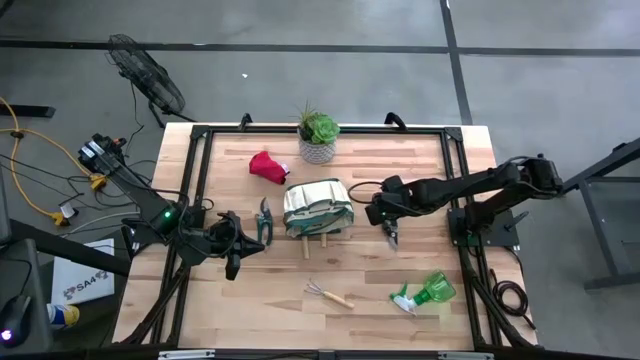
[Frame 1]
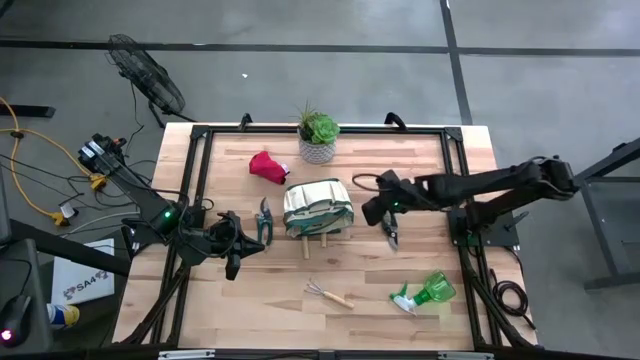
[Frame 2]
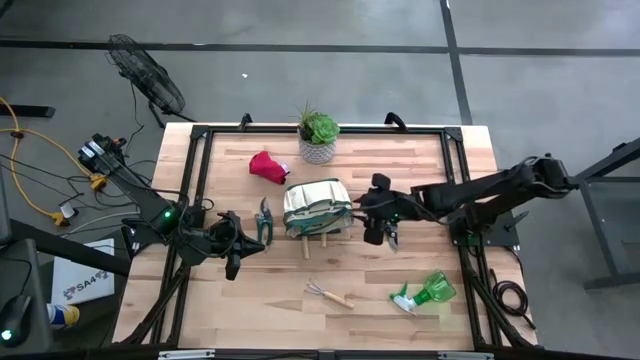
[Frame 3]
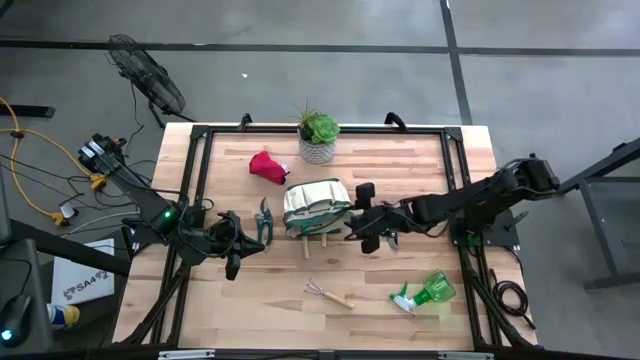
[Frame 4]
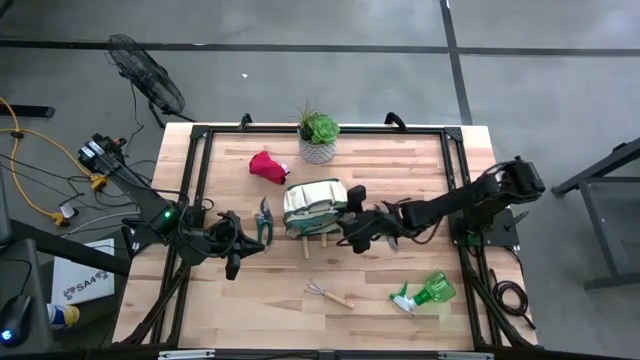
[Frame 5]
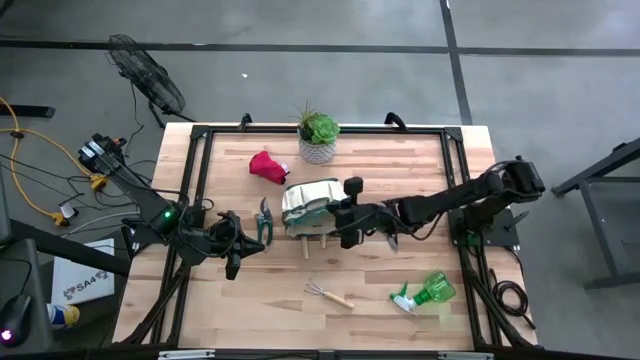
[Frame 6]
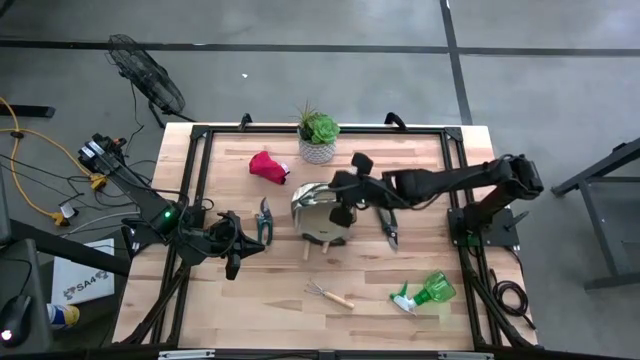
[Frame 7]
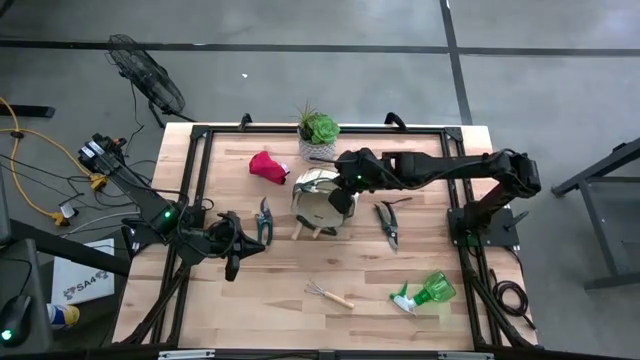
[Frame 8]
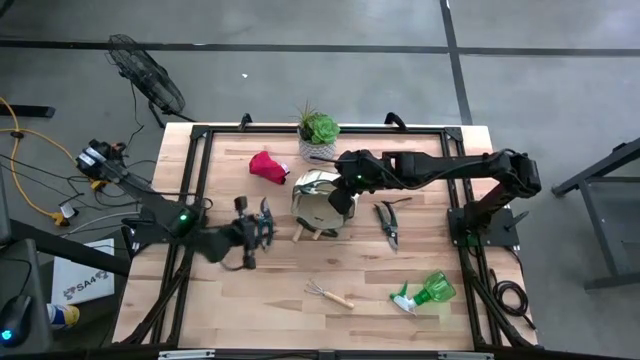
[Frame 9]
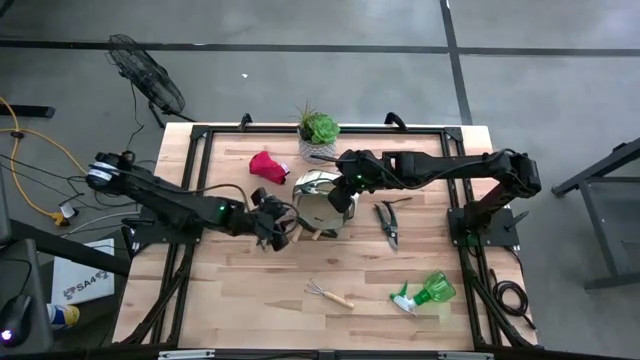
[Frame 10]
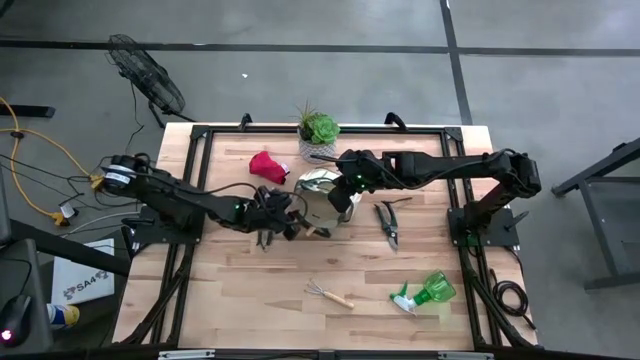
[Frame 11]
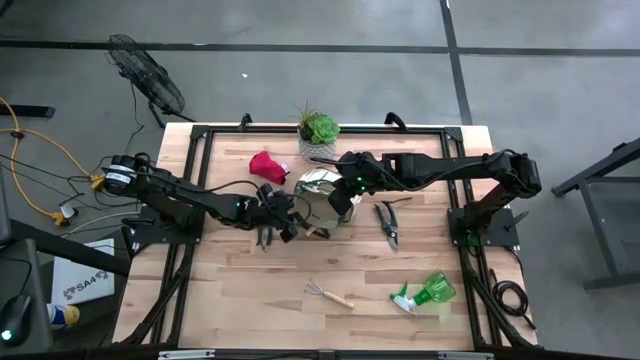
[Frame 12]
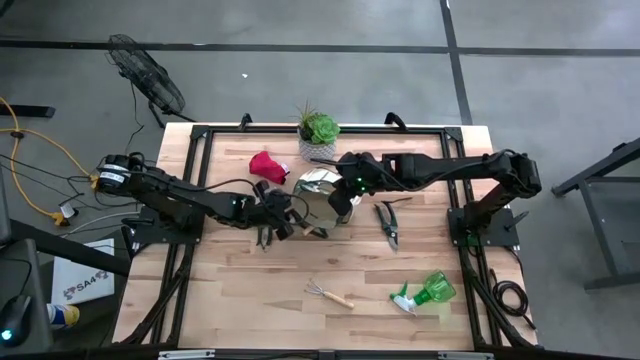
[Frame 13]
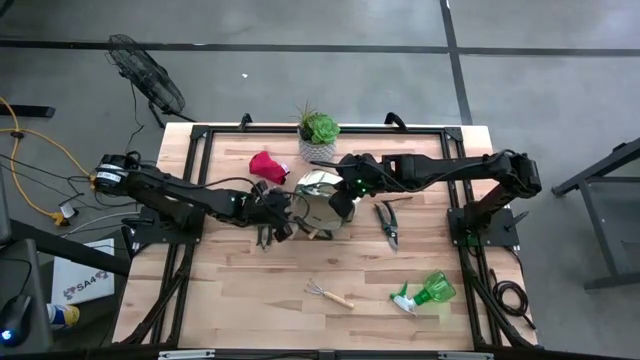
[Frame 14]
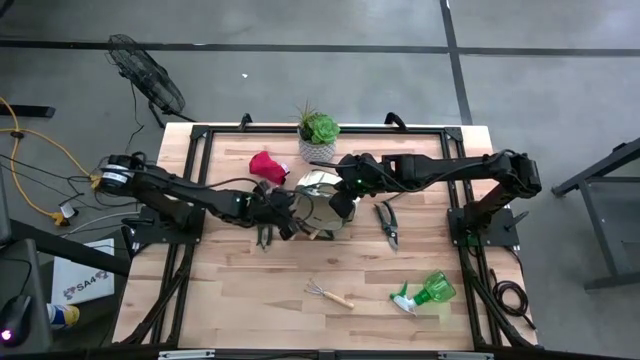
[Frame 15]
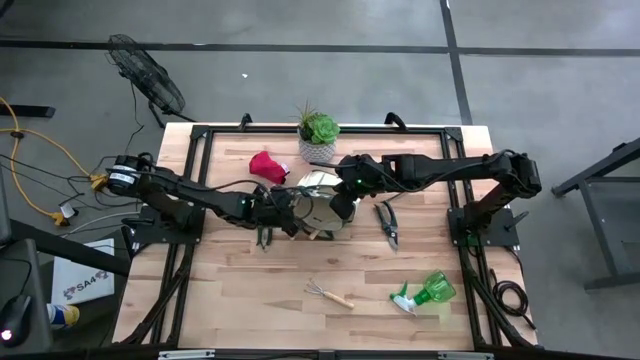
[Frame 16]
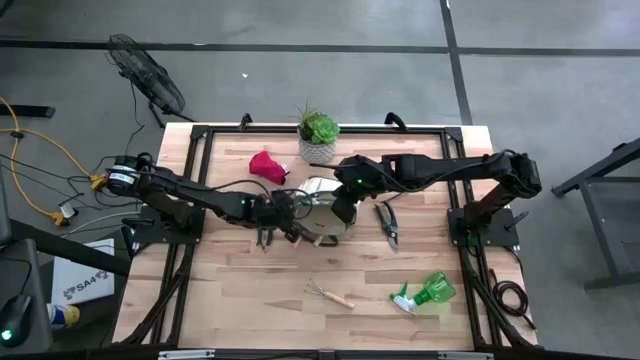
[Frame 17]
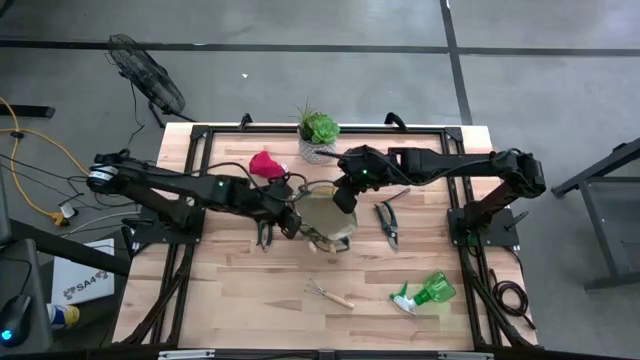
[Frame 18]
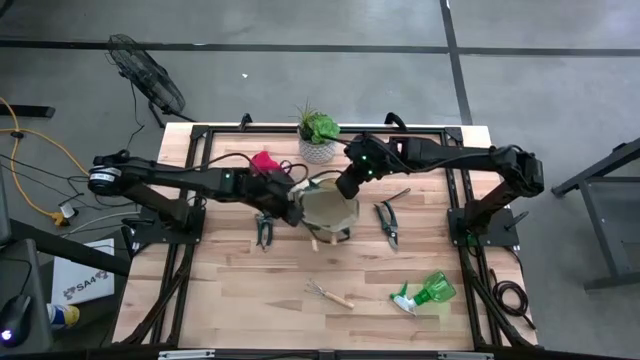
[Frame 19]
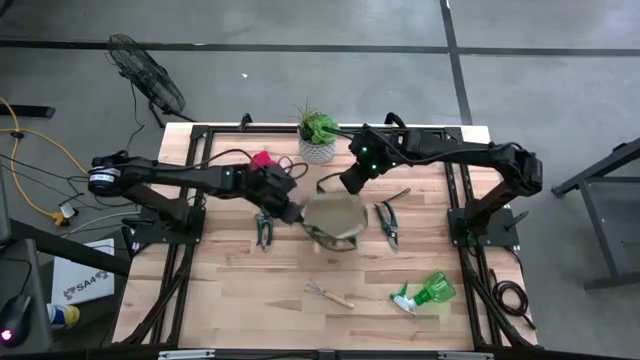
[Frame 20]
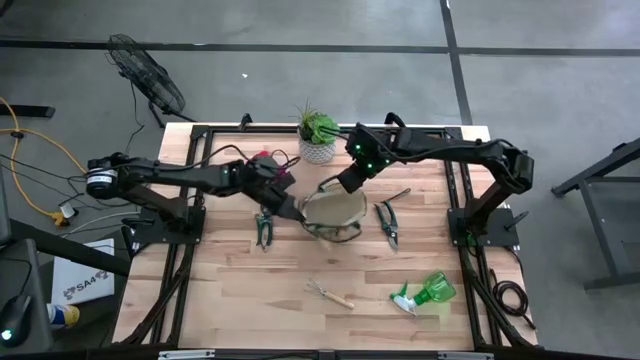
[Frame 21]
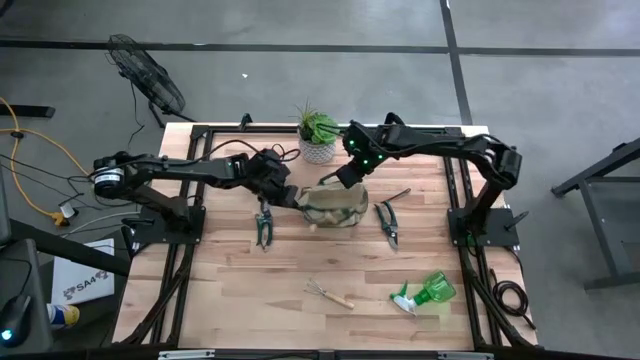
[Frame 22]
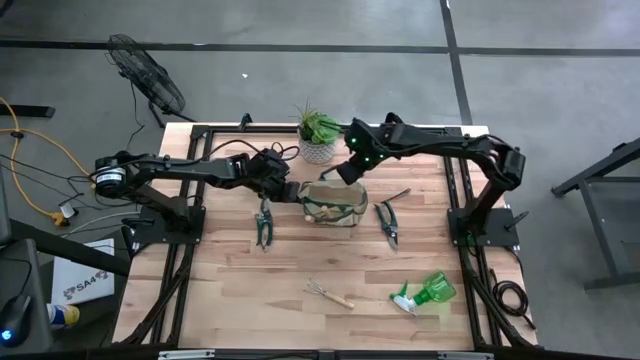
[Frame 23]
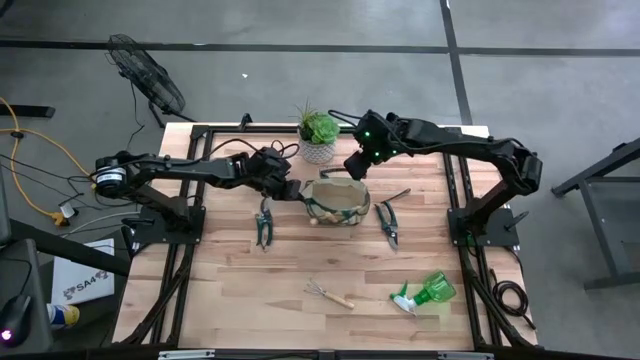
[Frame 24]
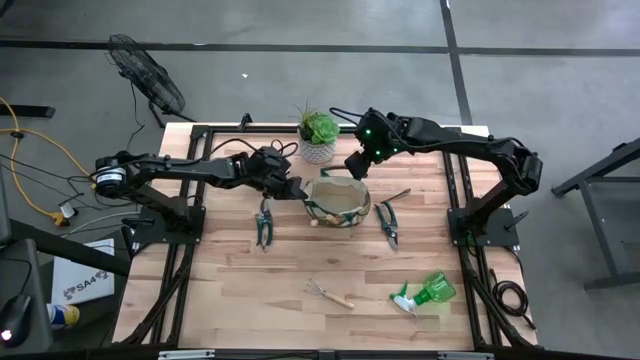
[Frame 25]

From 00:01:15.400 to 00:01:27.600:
Task: Pick & Place Garden tools in Gardening bag
Adjust the gardening bag

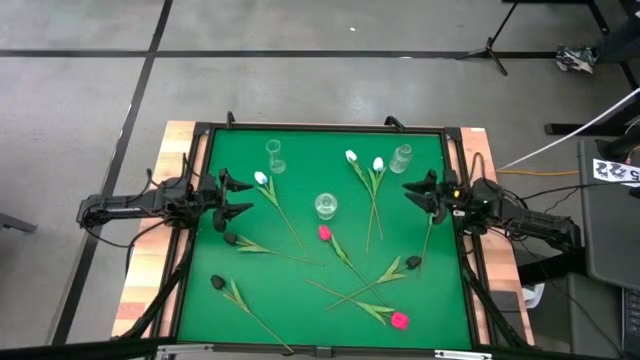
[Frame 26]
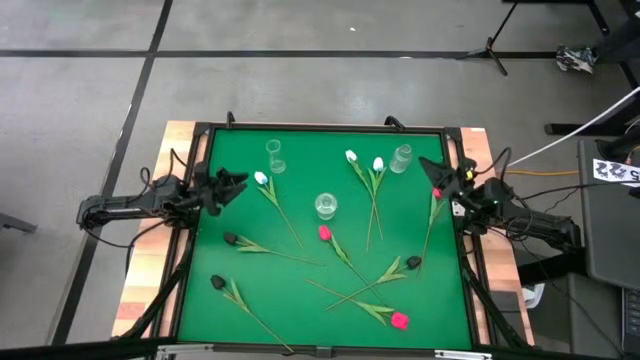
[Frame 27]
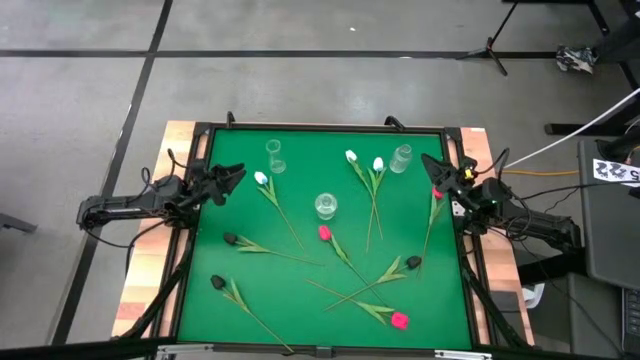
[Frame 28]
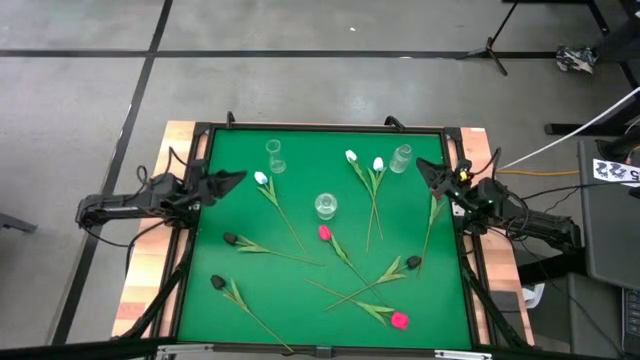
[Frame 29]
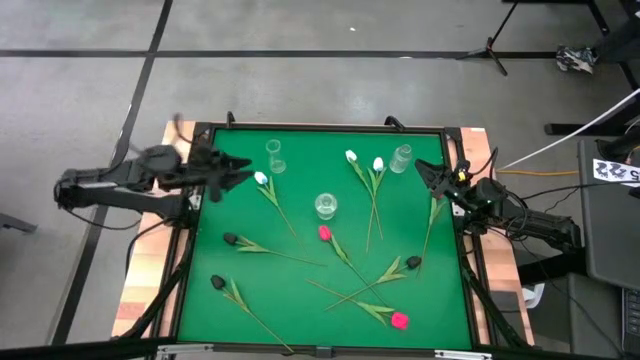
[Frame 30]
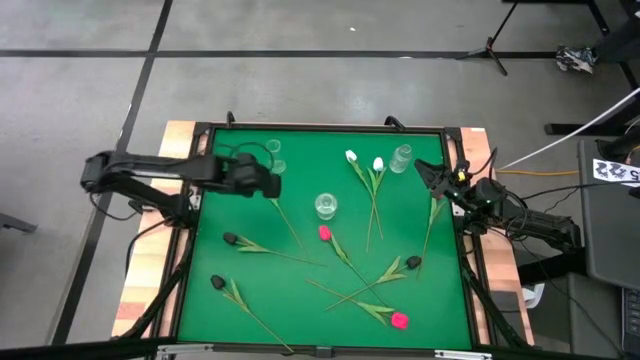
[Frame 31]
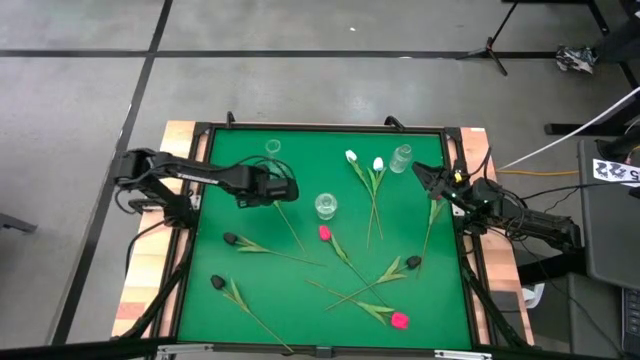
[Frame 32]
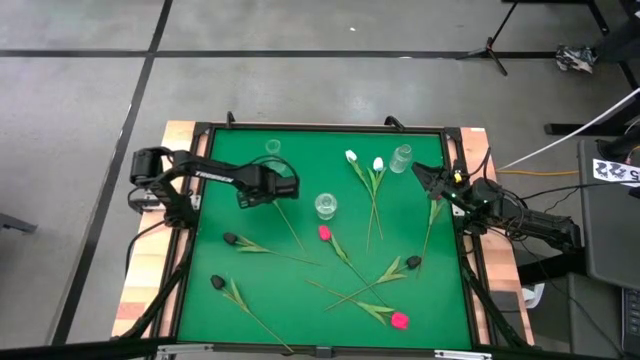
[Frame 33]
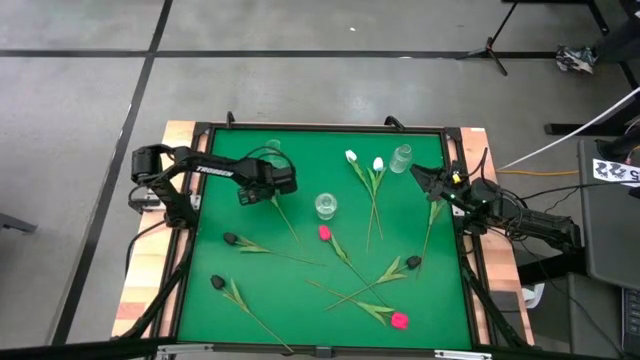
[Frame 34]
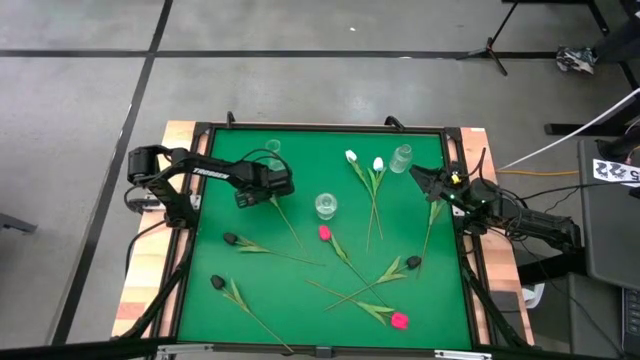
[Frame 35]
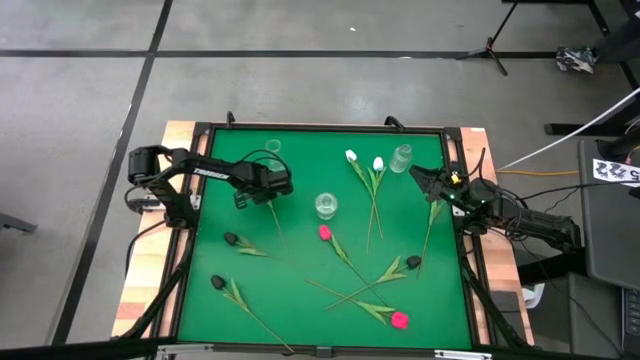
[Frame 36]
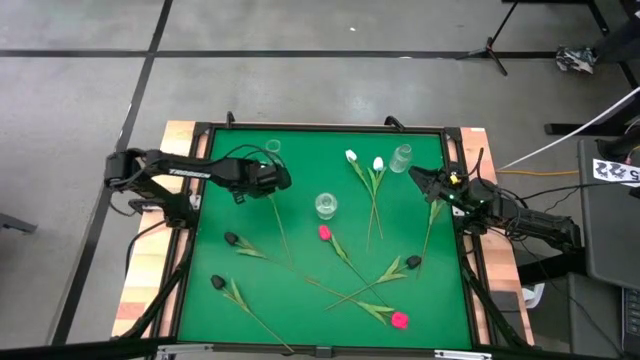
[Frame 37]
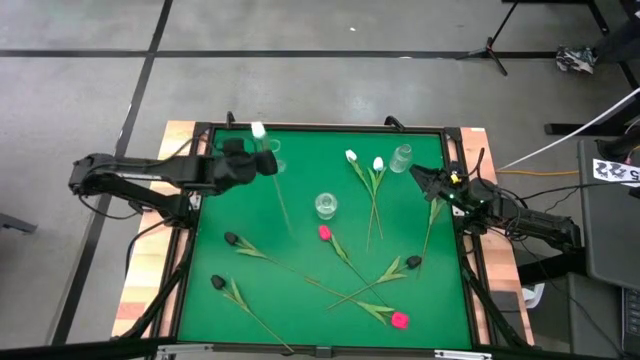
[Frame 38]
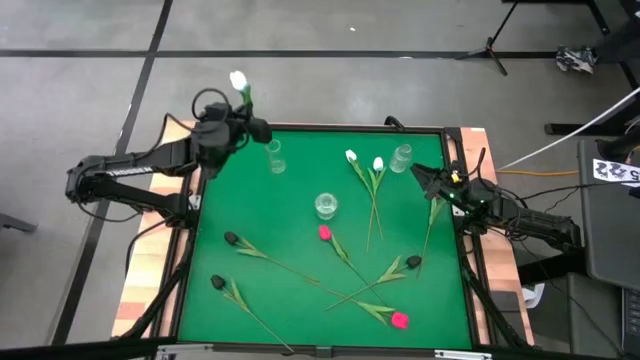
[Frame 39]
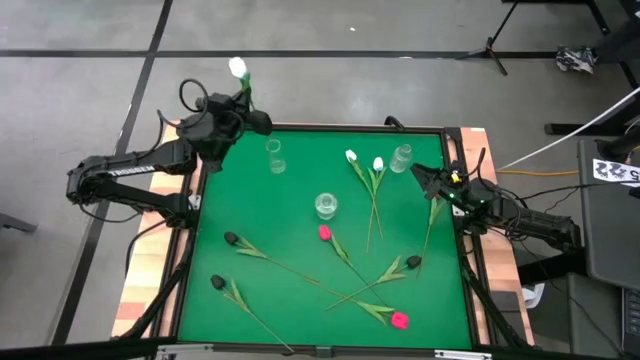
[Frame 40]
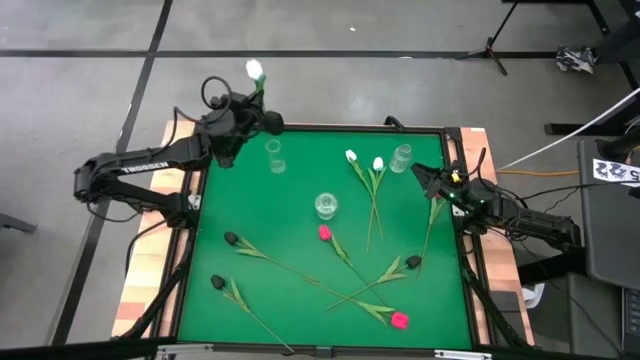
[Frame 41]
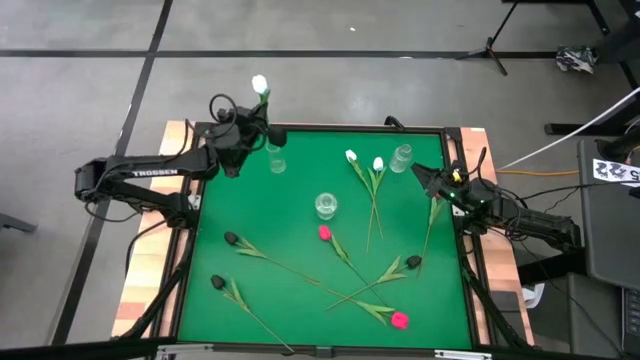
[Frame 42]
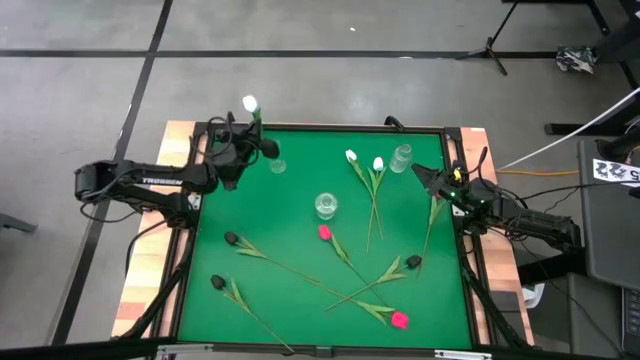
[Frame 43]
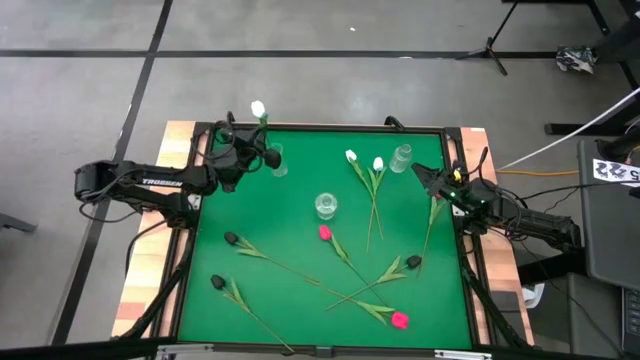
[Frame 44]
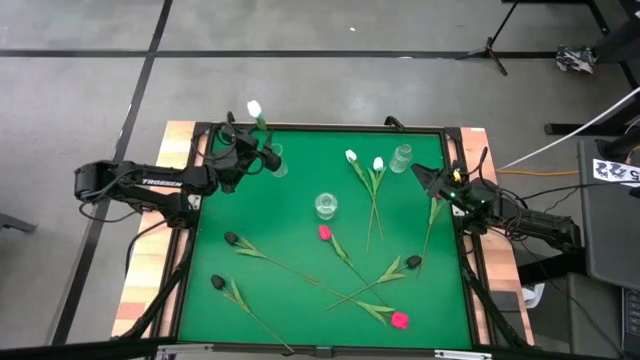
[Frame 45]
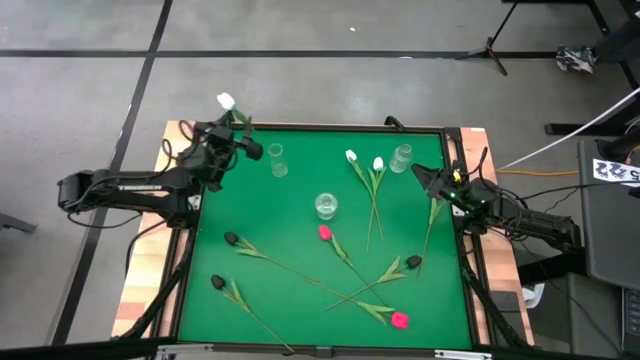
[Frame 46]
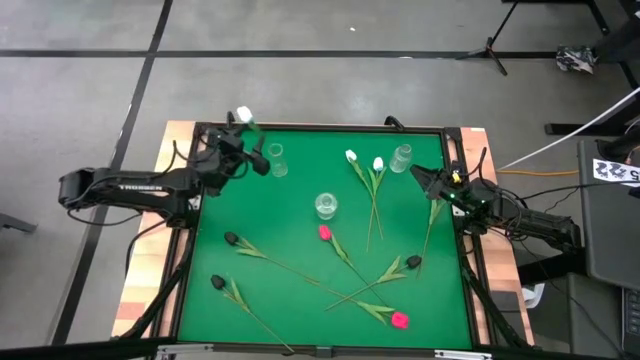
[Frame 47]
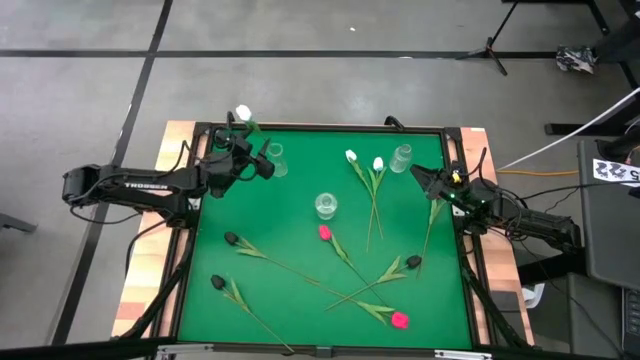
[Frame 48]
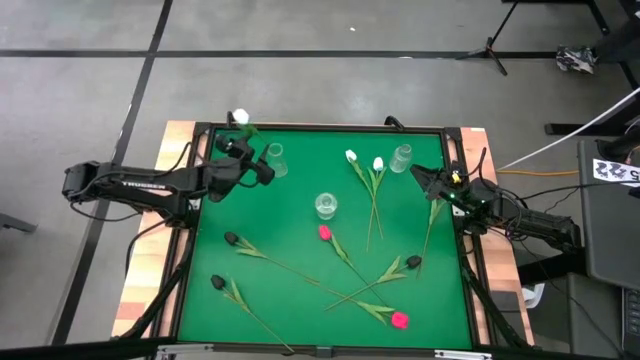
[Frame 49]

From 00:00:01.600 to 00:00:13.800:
Task: Sort flowers into vase by color
Put the left white tulip into the top left transparent vase
